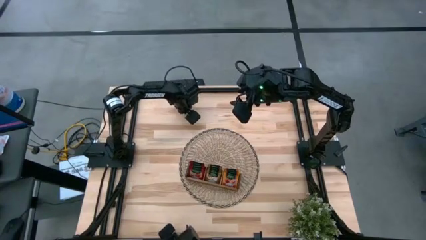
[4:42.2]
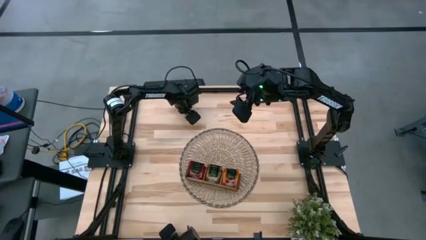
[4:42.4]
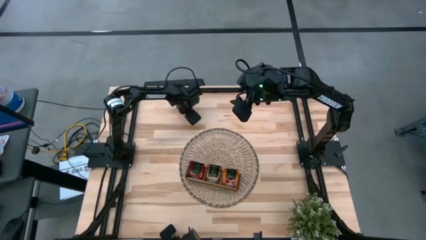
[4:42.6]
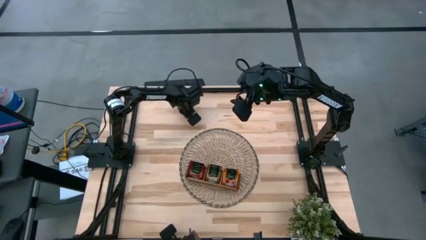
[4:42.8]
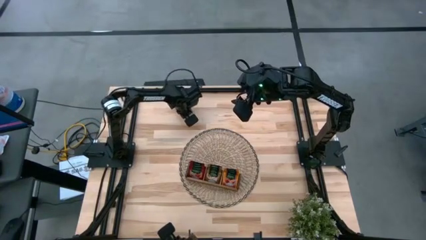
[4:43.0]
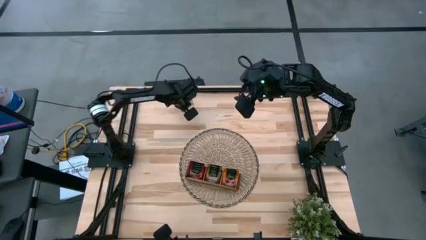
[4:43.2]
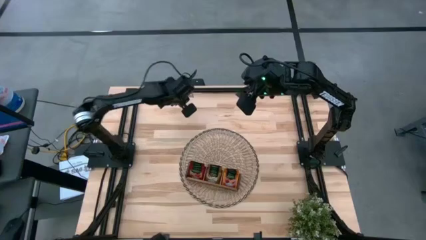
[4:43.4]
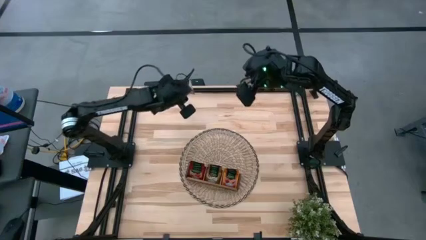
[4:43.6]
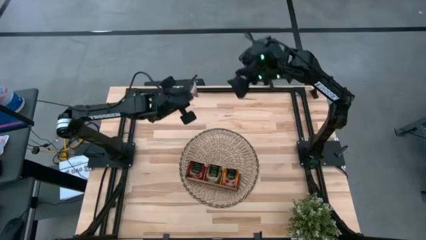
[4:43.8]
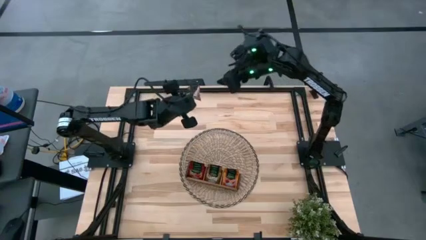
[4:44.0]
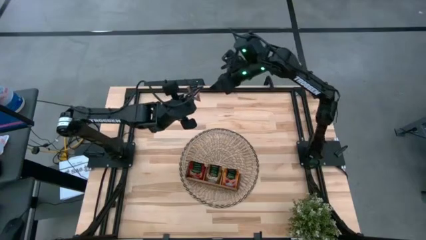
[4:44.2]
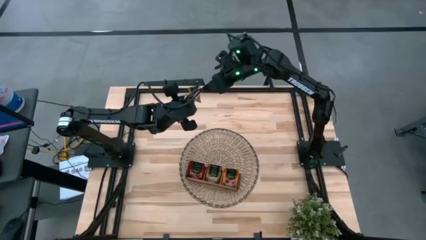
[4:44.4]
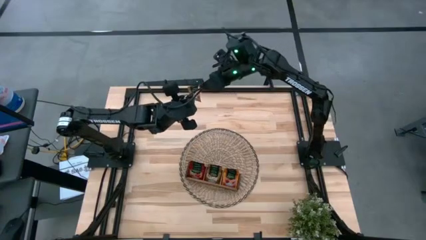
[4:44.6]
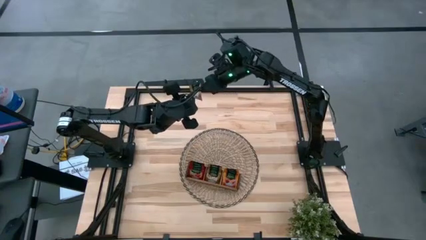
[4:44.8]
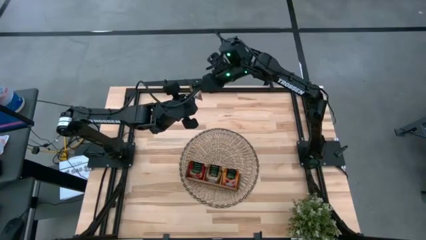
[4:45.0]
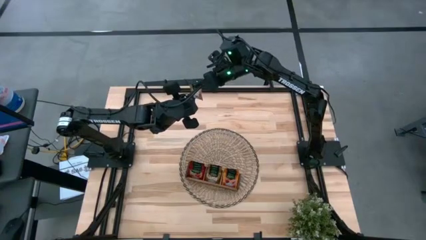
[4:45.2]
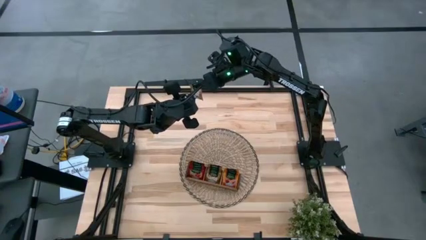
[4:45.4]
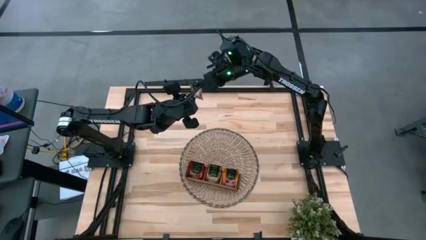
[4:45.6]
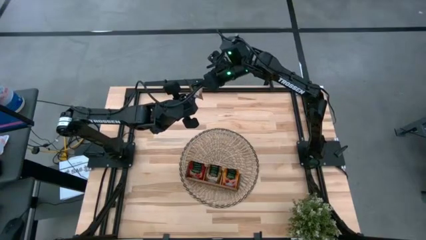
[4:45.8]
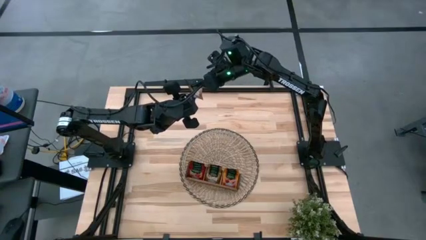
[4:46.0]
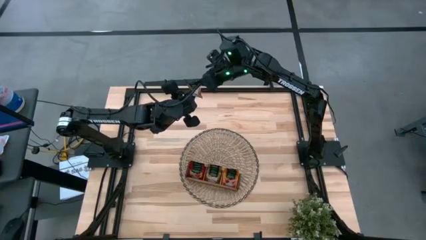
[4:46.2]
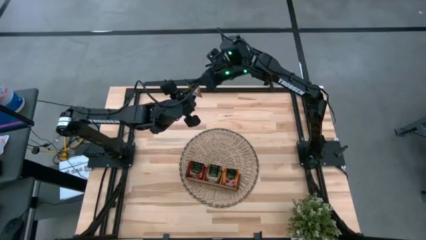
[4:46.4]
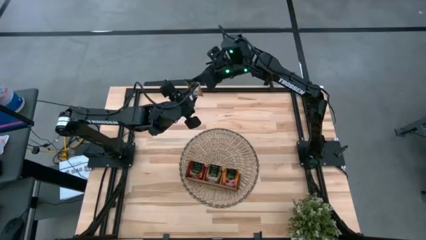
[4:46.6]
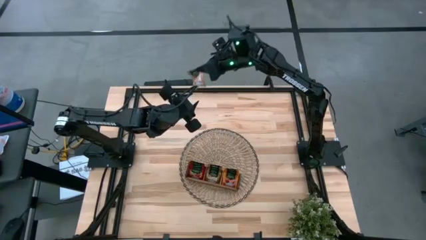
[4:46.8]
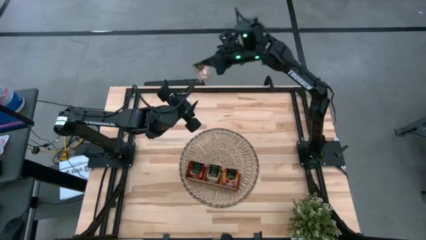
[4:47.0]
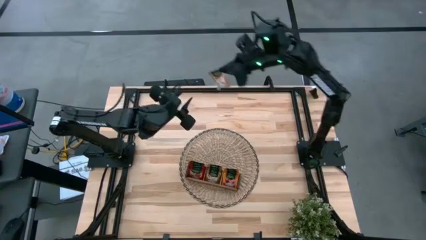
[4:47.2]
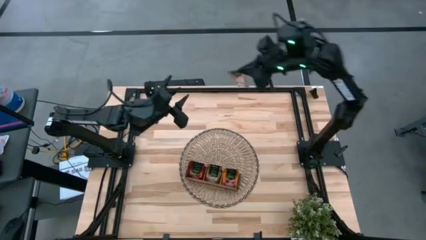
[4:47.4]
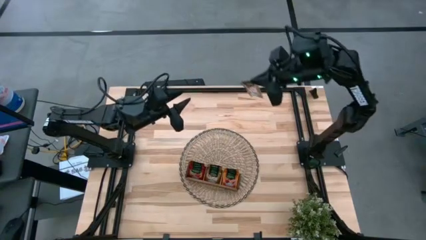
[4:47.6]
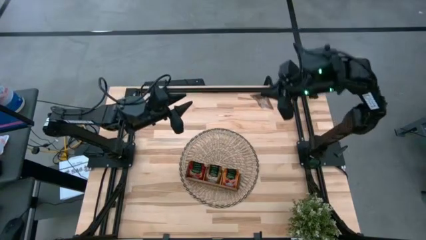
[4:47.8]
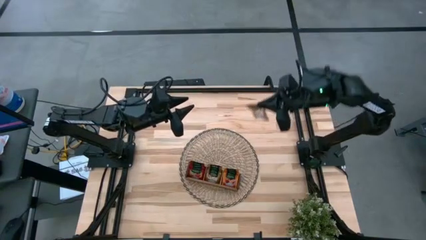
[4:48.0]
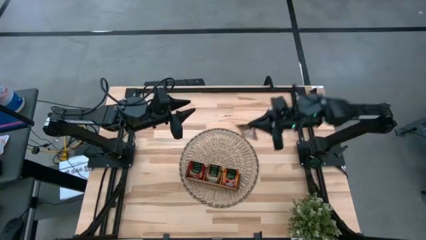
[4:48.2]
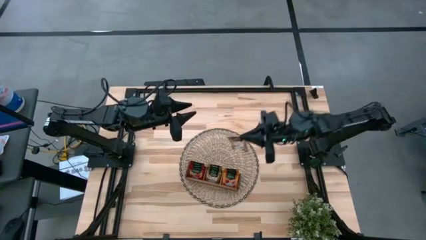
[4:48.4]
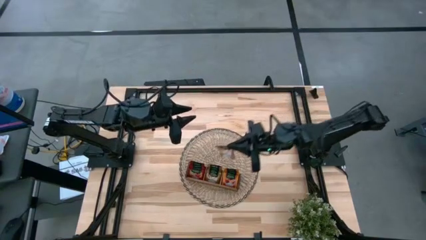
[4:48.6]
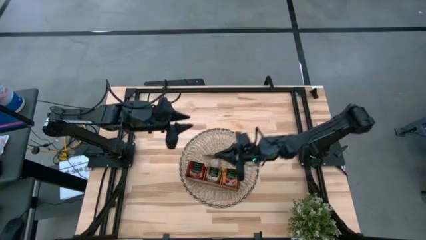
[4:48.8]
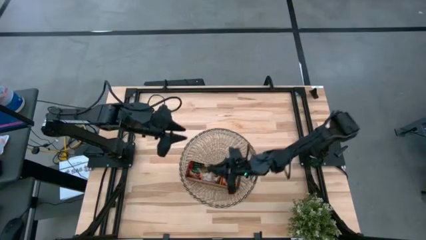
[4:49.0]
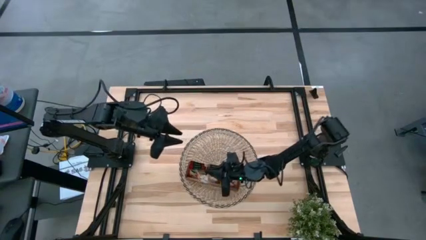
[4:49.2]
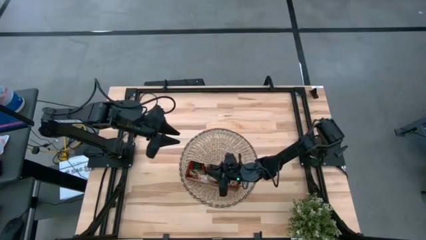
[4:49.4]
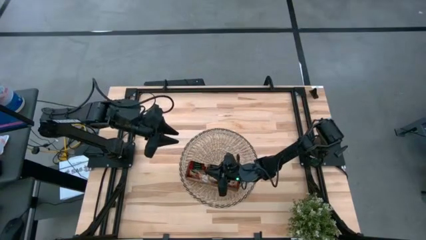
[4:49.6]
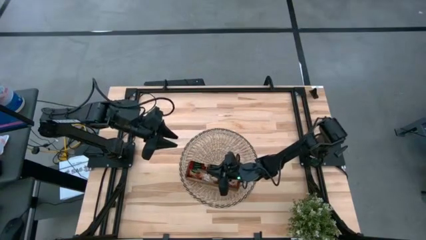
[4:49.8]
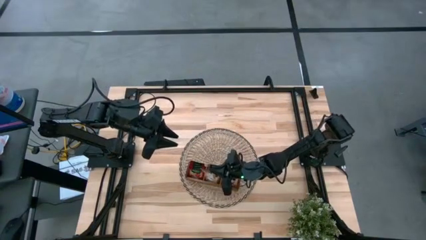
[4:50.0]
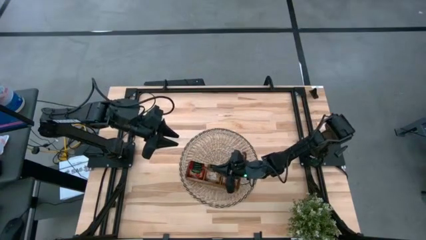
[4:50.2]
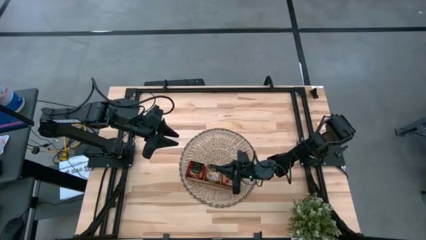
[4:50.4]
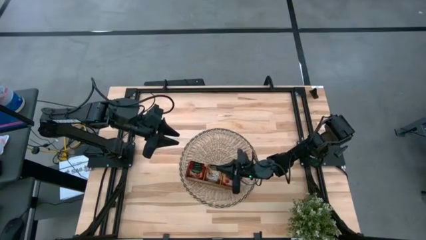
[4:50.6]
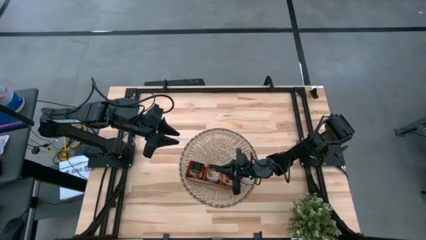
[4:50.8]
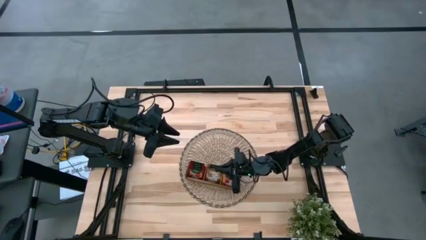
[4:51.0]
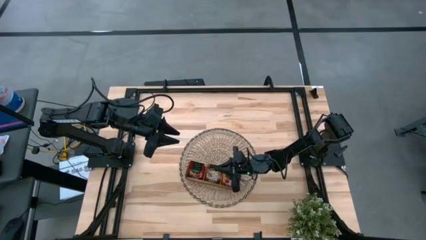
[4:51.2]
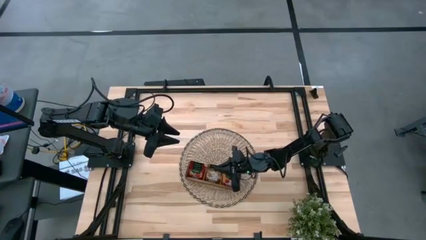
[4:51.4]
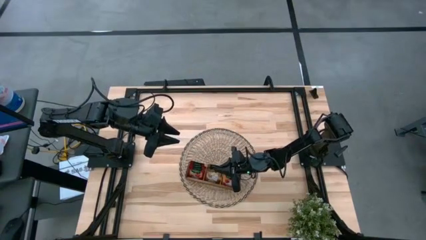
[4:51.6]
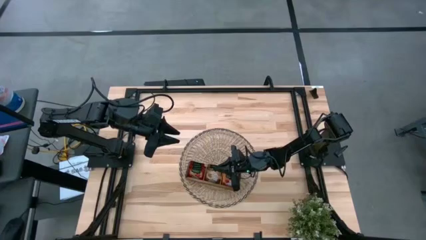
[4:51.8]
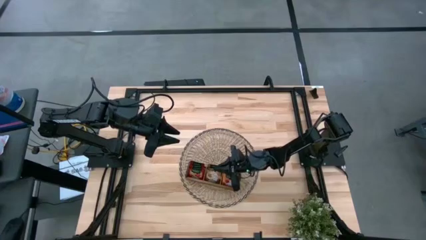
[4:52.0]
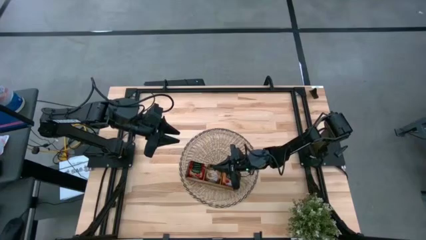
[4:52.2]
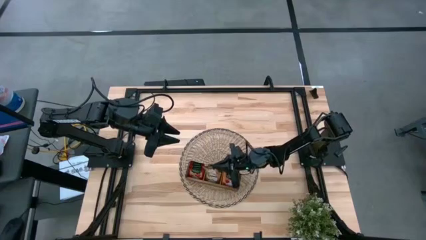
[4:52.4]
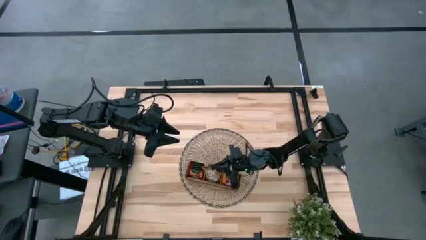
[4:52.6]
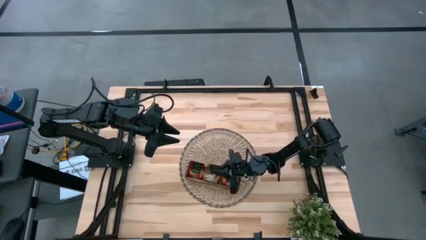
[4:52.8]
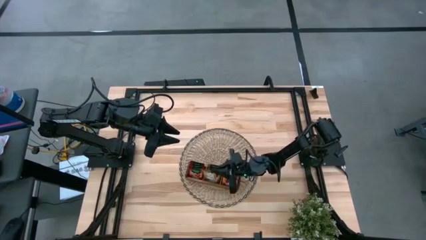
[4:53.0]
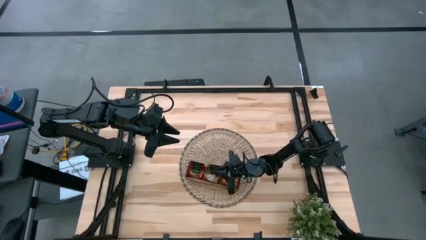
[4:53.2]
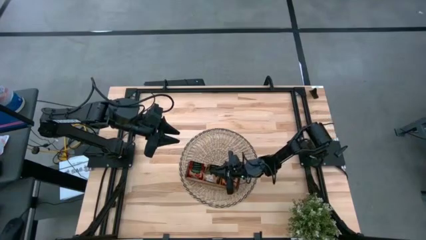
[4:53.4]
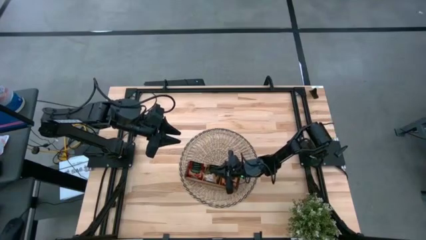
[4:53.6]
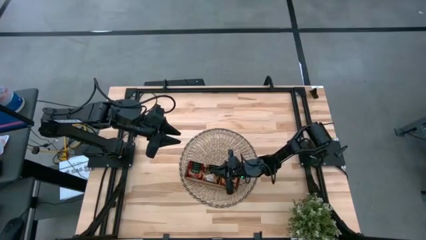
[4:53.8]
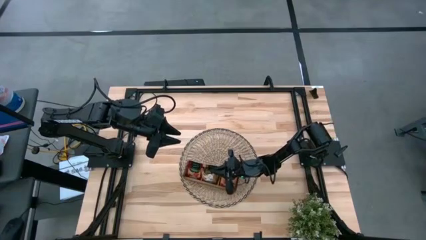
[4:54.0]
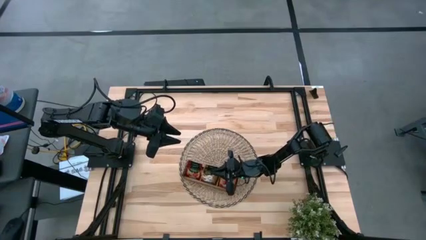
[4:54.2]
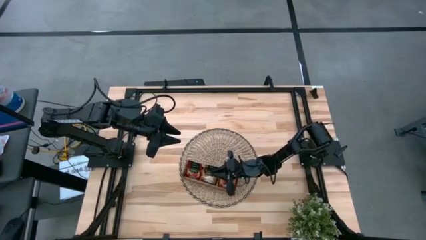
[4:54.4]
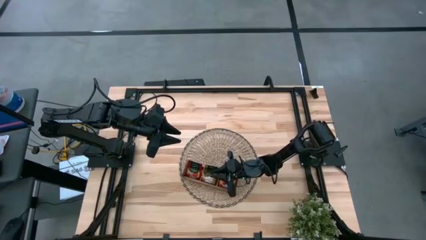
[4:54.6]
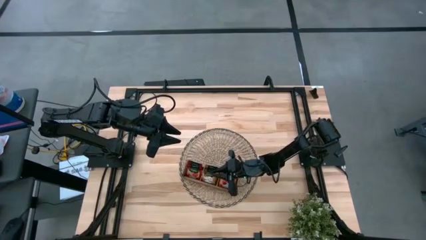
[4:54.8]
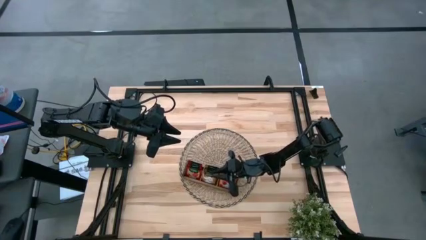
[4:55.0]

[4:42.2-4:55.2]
Task: Pick & Place Tea
Put the brown tea bag into the middle section of the wooden organizer

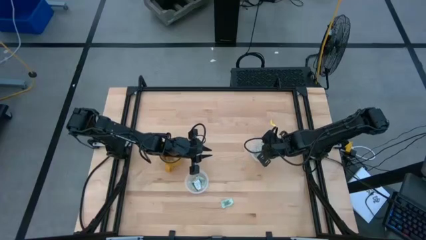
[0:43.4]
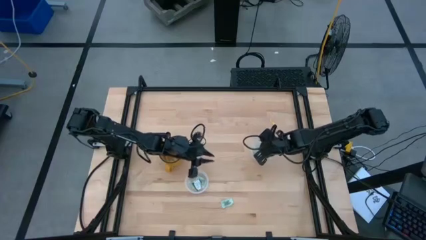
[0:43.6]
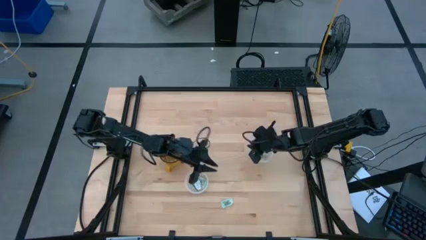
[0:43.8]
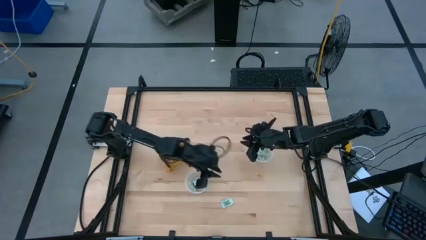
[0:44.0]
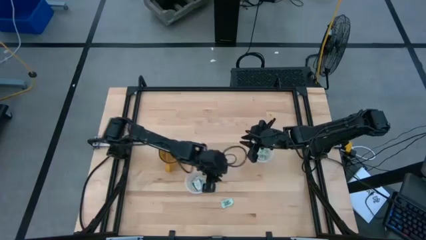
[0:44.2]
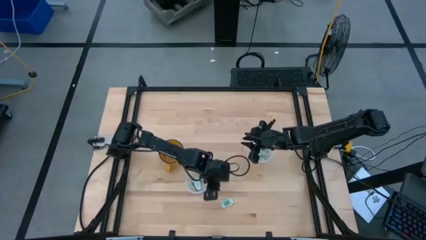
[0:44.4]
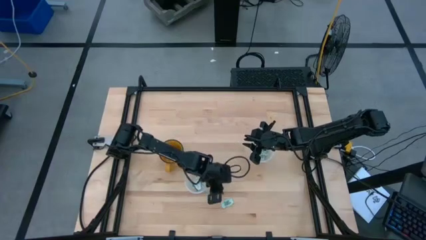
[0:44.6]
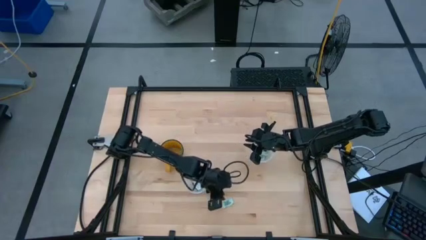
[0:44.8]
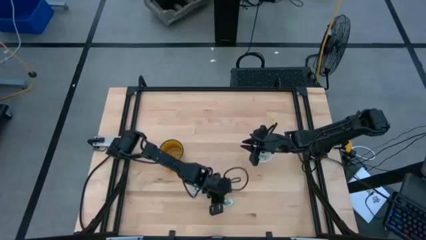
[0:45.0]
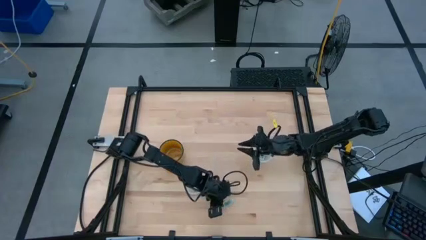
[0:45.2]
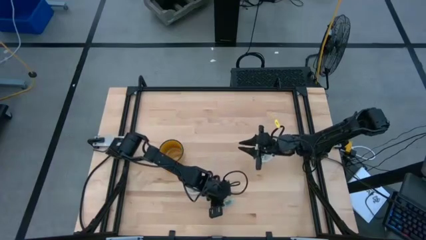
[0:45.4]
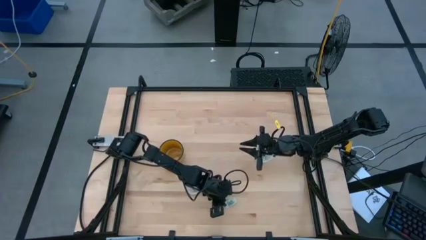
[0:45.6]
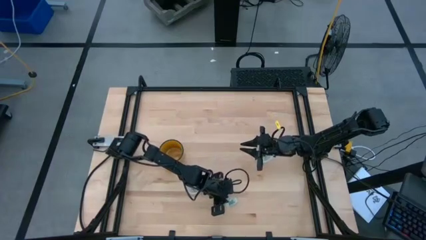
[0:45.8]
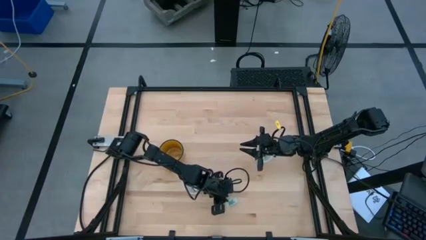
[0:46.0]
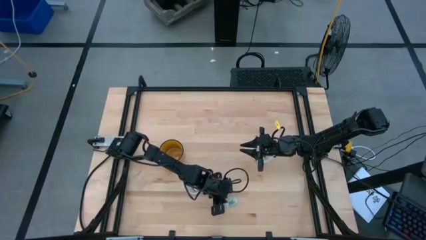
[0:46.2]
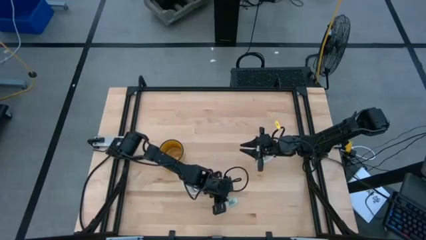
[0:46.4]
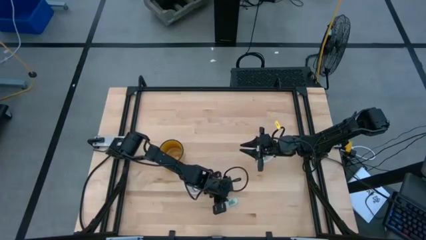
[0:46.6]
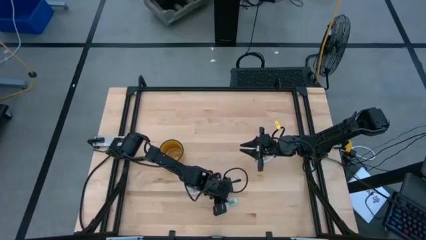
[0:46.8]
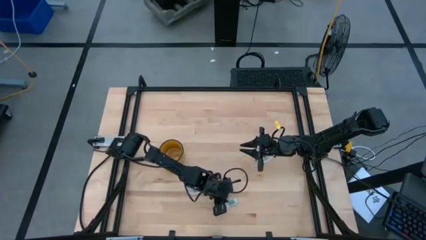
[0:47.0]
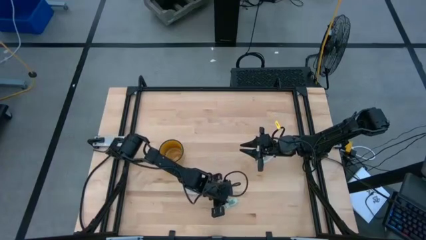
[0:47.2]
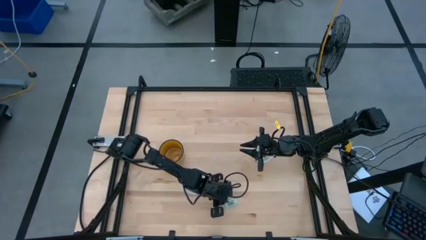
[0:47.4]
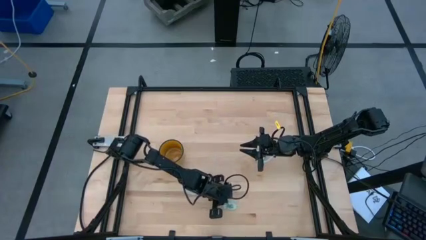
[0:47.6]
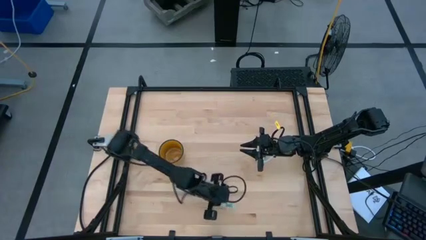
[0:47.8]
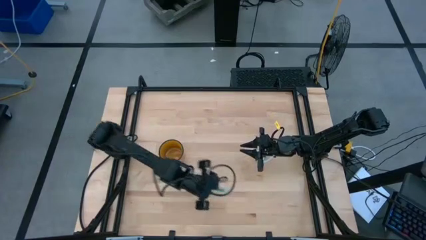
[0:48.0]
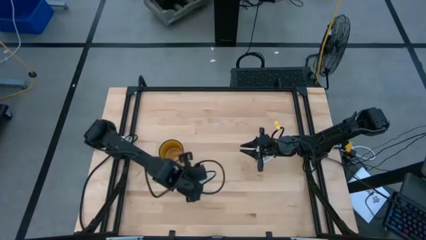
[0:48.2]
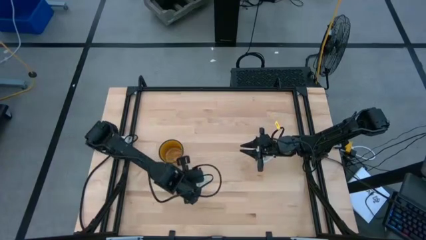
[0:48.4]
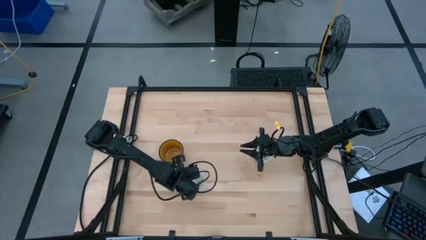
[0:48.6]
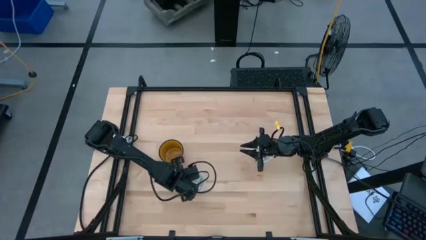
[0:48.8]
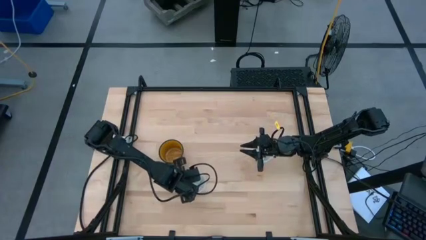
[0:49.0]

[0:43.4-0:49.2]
Task: Pick and place Stevia / Truvia into bins
Put the white stevia packet into the left transparent container
